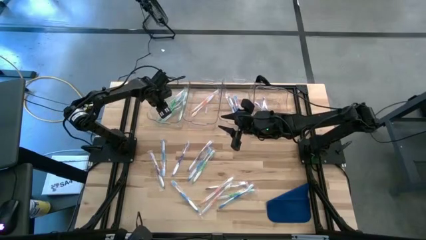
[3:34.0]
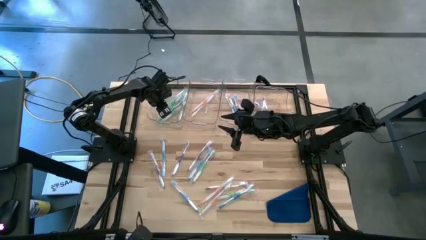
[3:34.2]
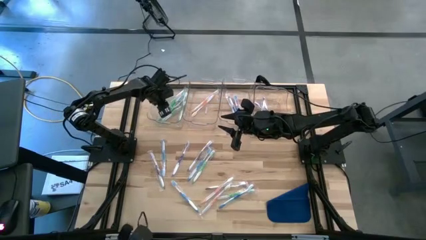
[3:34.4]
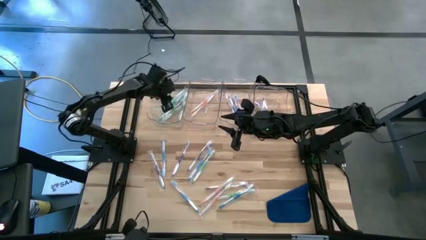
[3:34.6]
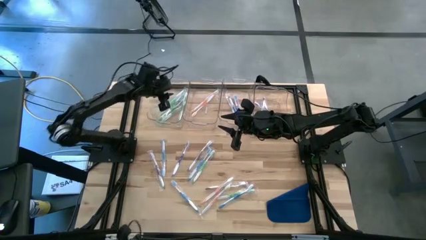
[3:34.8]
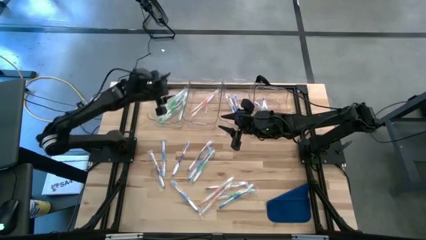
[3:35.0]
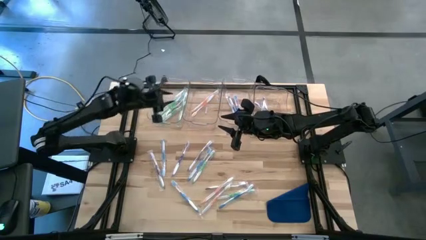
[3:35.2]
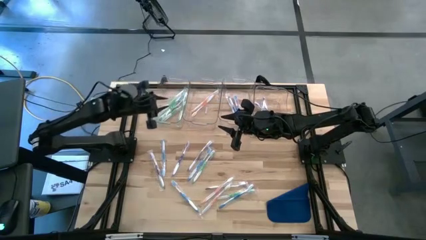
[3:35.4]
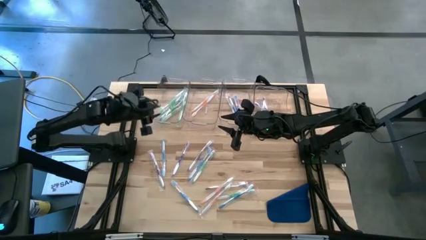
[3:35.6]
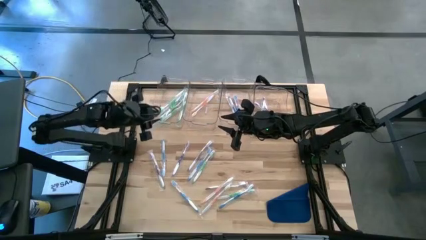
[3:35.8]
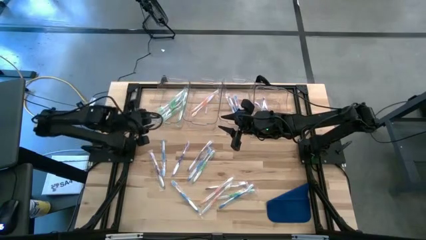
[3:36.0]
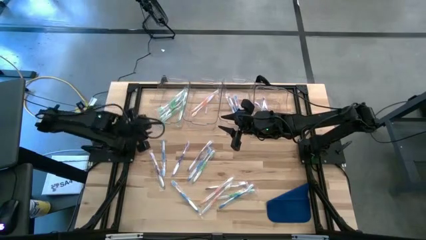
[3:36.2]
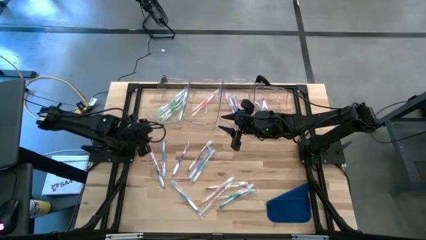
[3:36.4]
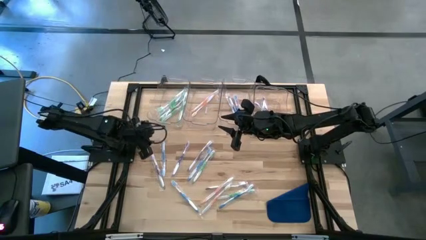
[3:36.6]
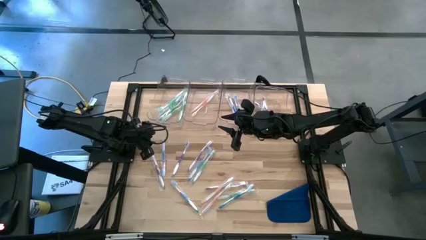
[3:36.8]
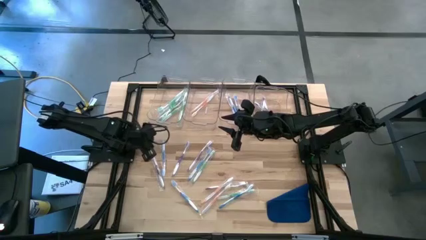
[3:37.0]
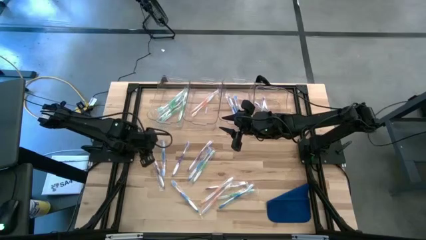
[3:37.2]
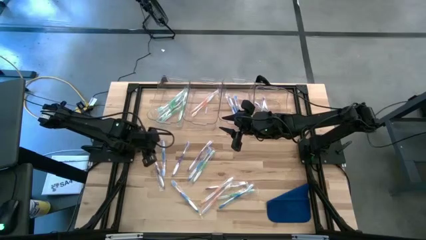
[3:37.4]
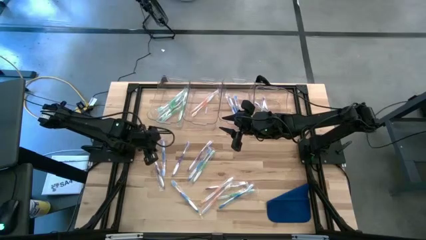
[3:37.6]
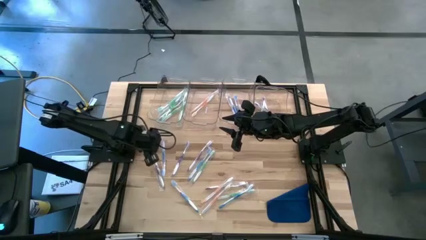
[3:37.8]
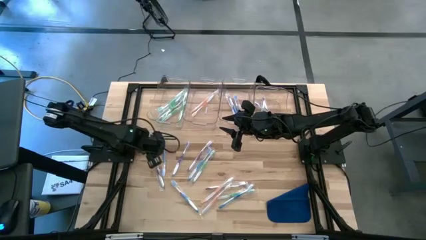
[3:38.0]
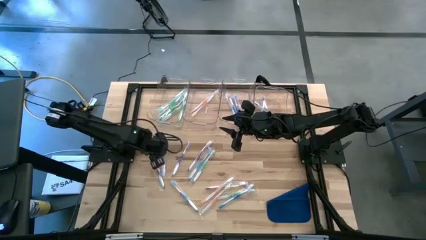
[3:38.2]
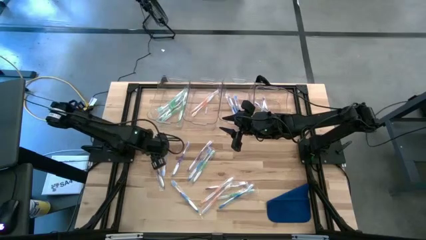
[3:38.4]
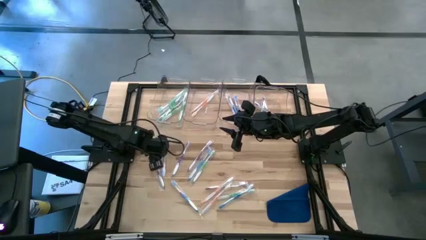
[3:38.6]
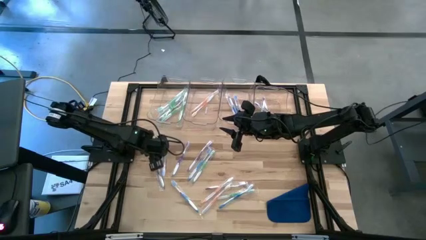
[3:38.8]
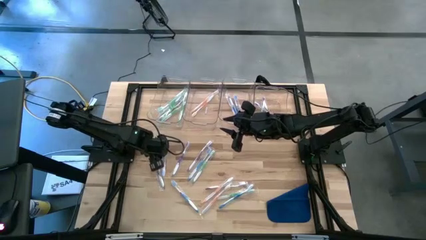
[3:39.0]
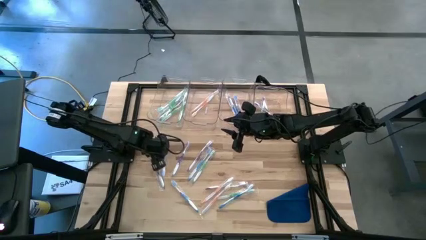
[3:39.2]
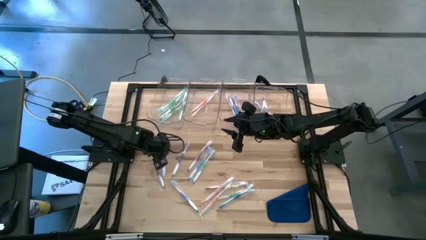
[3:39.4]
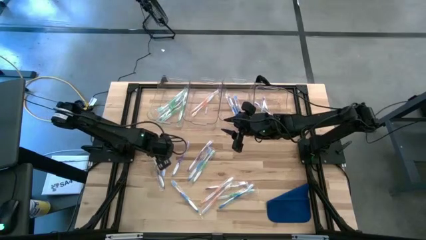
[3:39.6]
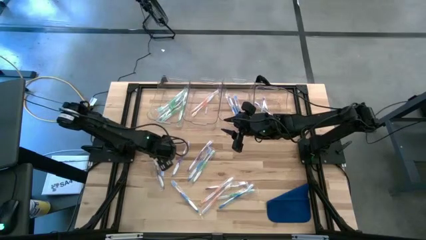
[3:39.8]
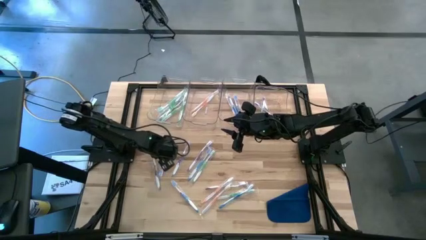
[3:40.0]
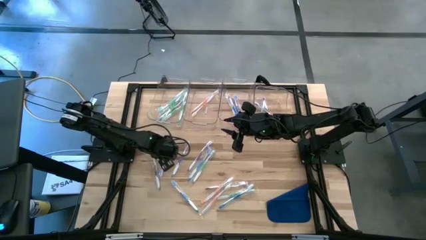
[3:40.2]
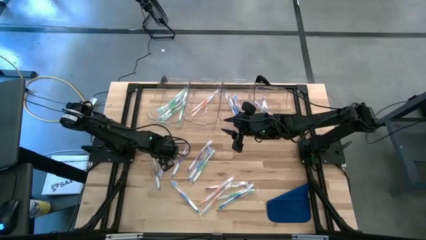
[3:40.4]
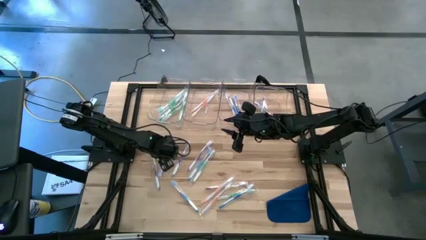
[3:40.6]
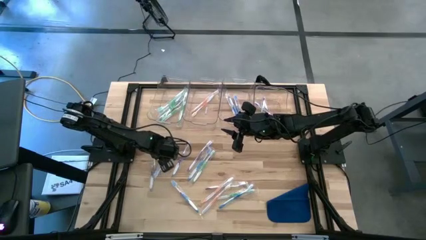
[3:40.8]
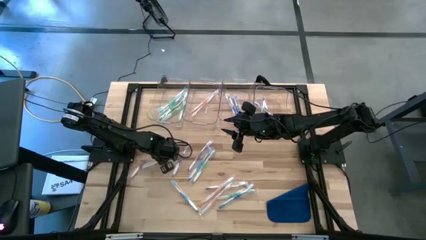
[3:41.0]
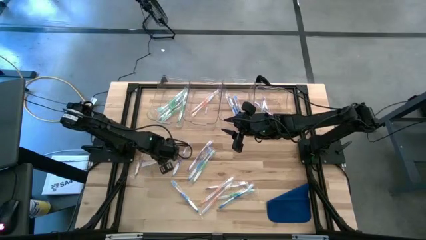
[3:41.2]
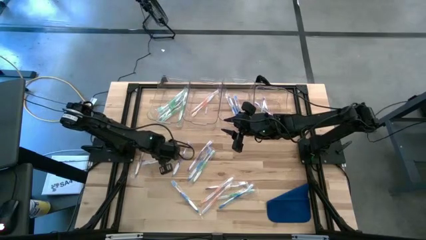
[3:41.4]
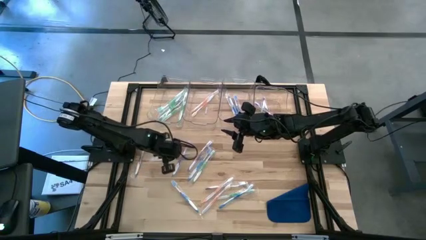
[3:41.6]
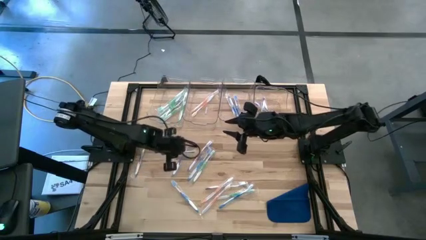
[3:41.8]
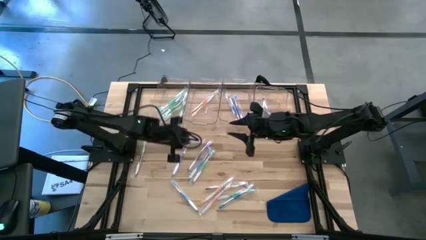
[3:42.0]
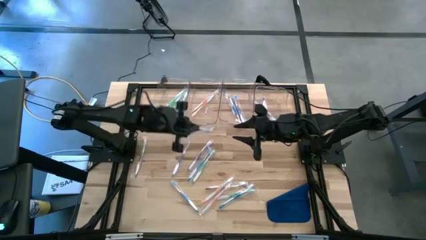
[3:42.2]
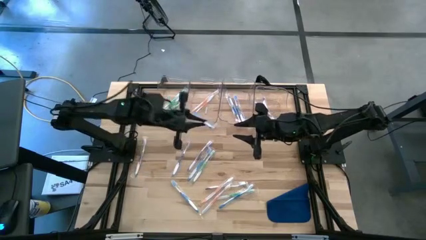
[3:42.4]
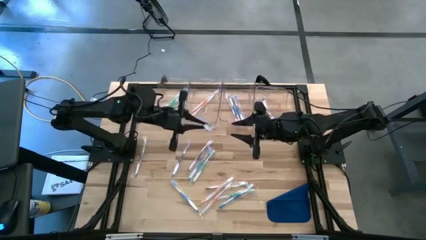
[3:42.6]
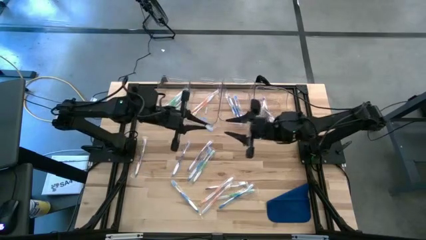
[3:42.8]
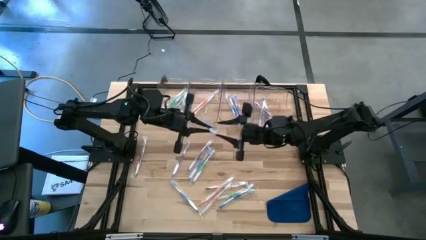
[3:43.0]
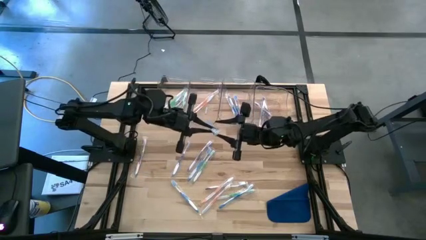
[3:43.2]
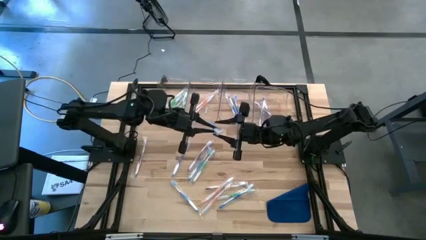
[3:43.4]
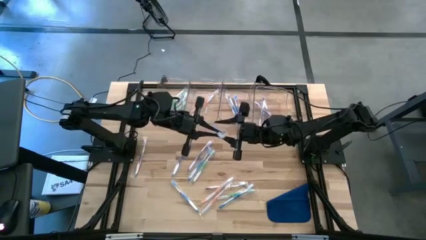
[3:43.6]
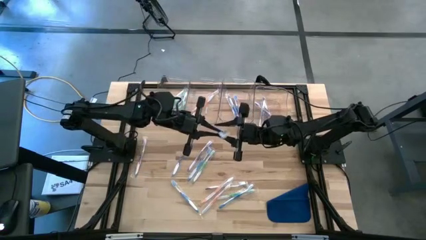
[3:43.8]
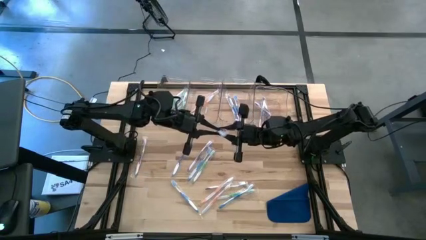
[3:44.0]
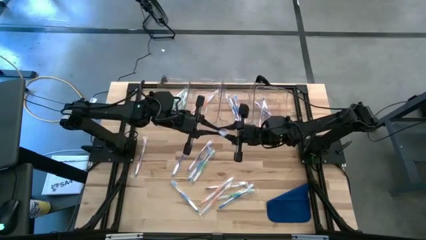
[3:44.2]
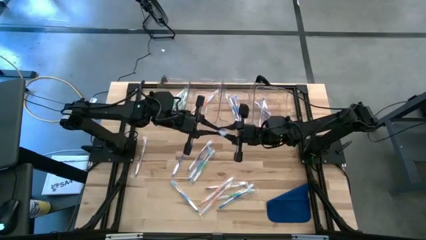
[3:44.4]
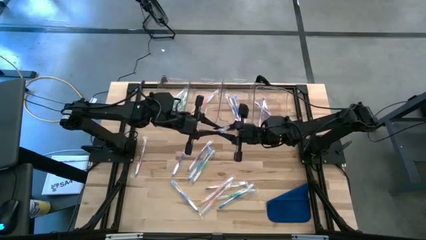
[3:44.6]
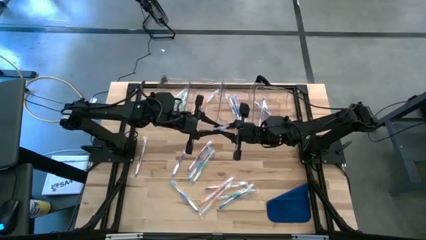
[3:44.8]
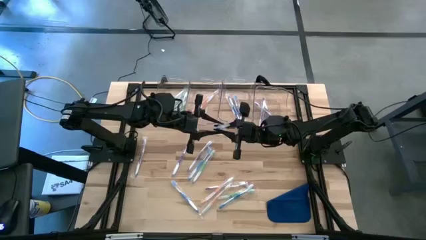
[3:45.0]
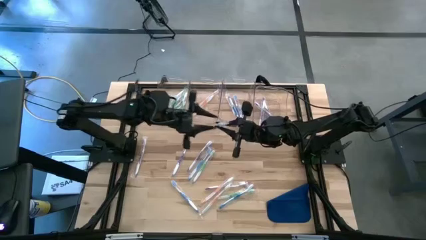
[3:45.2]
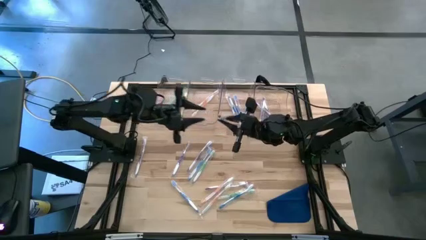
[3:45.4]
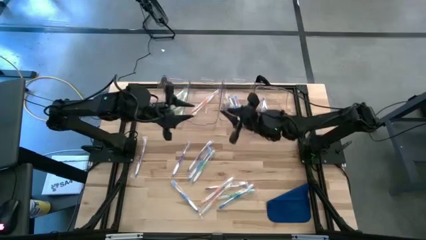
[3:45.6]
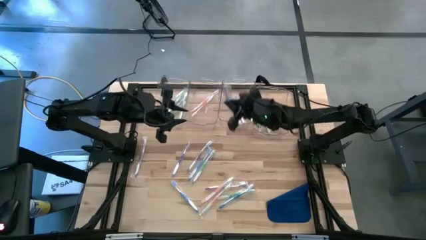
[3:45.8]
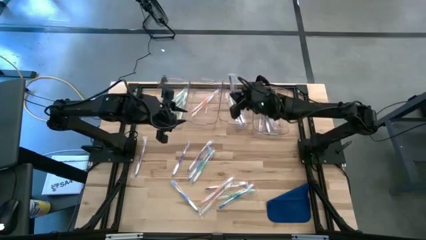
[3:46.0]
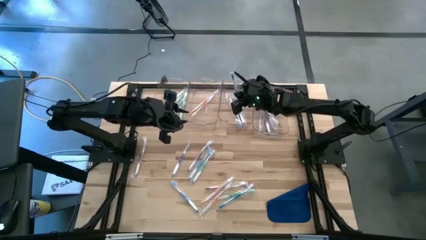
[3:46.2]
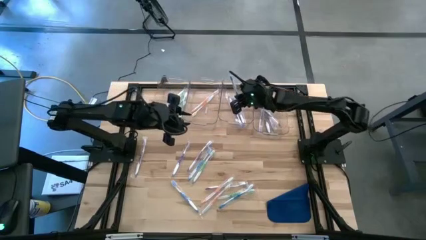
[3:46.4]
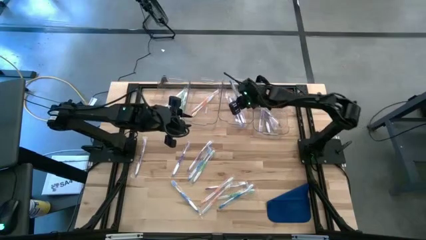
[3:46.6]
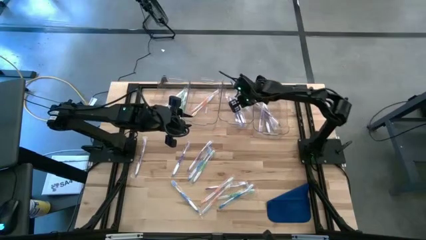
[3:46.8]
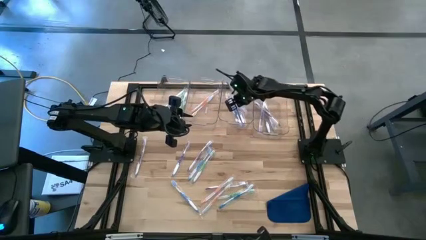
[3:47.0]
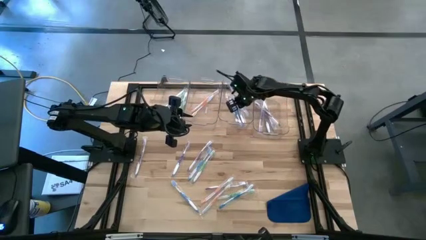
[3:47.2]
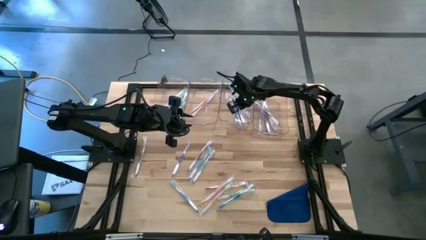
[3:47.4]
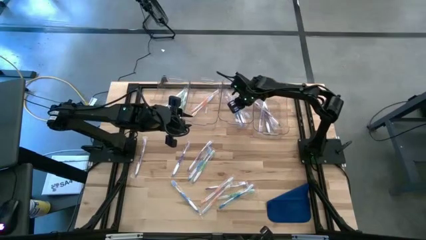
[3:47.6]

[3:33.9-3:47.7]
Task: Pick & Place Toothbrushes
Put the blue toothbrush into the middle right transparent bin

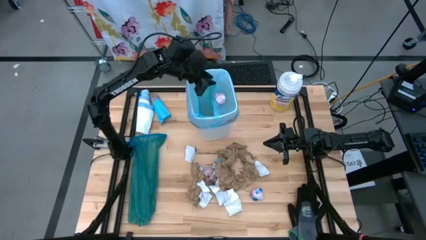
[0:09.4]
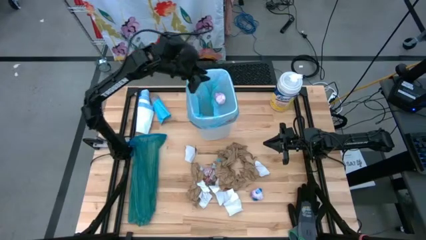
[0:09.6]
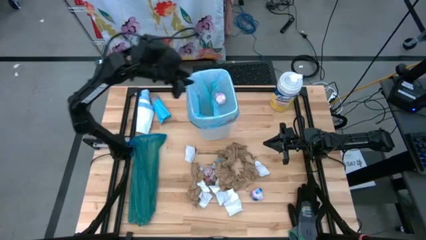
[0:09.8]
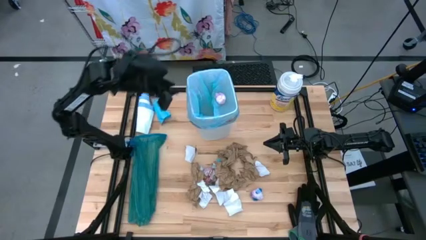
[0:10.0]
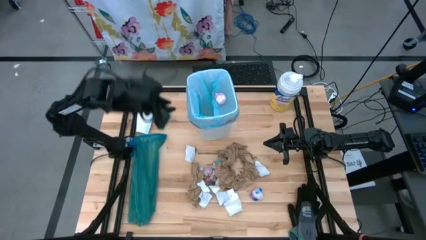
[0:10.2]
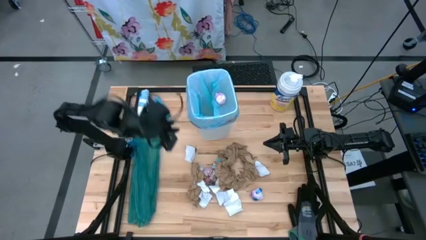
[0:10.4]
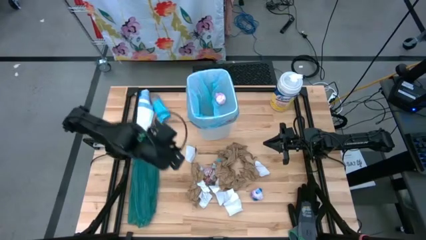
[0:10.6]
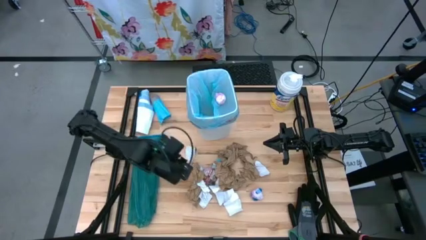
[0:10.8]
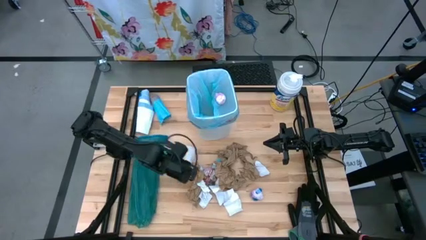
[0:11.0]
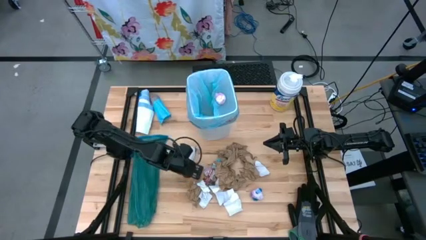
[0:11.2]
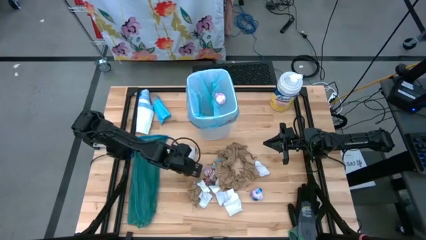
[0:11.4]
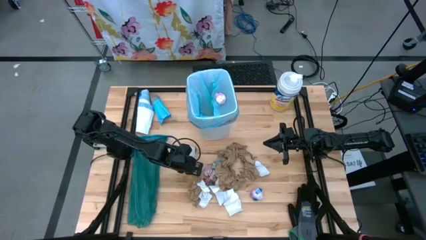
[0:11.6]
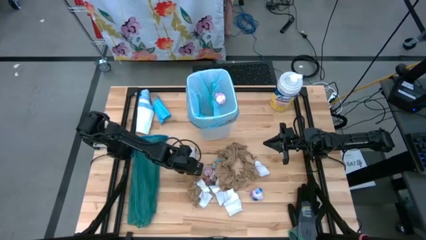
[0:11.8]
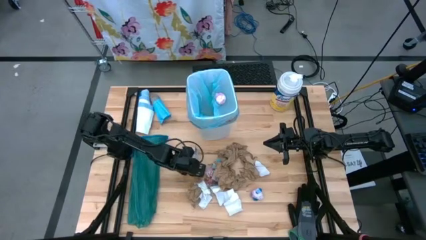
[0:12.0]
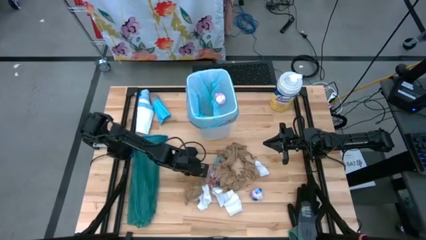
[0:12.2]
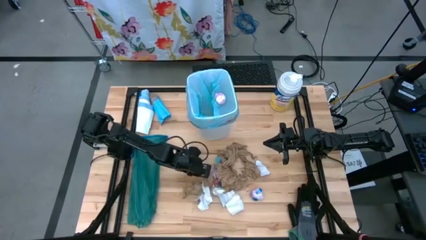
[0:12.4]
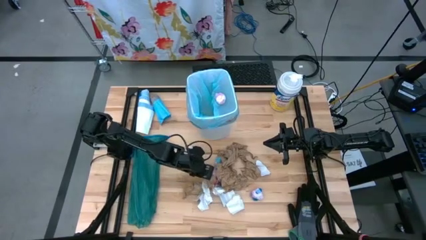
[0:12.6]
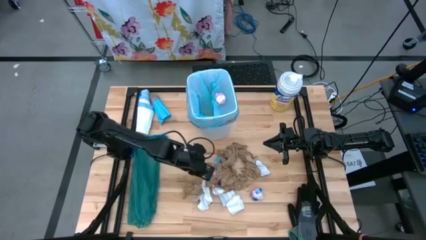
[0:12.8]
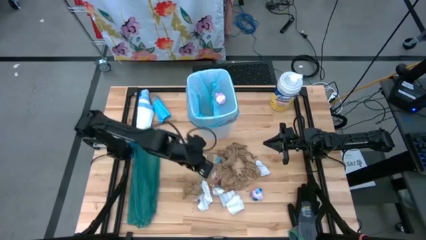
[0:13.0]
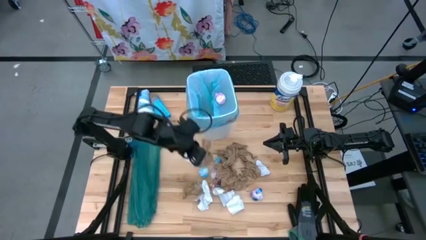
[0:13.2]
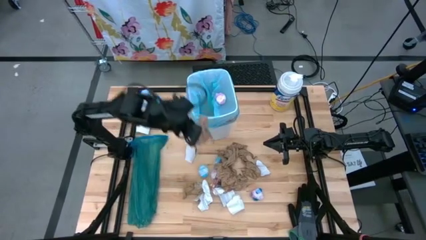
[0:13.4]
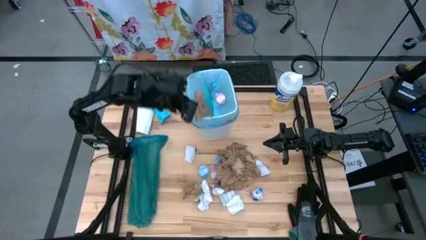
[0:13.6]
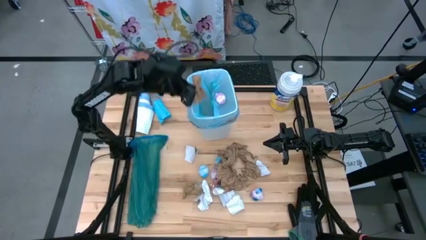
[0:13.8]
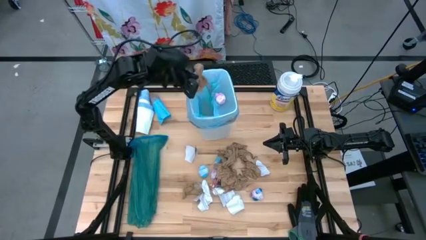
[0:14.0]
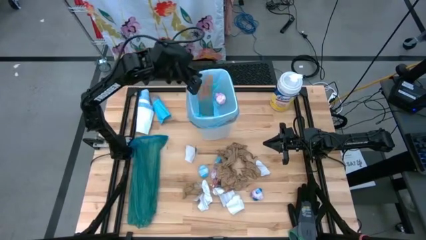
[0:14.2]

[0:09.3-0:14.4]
Task: place trash/remove bag and relplace
Put the brown napkin into the trash bin
